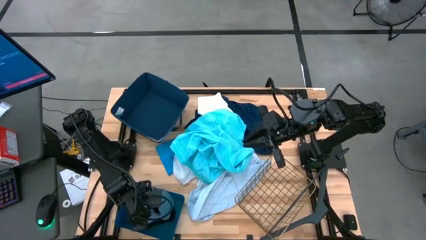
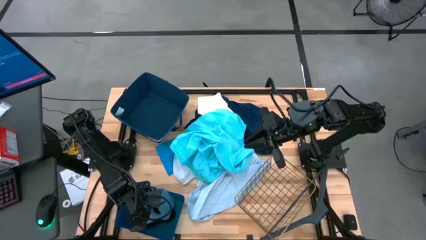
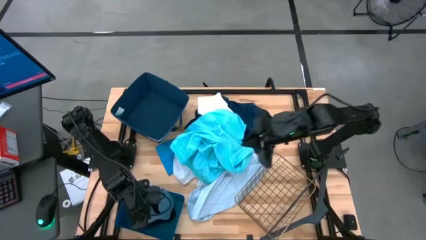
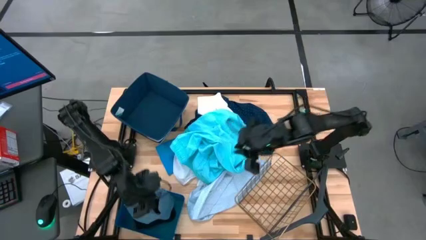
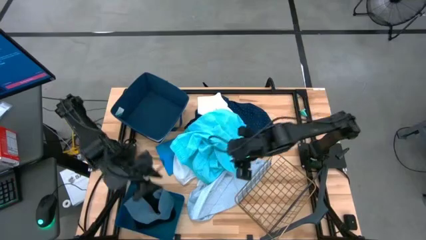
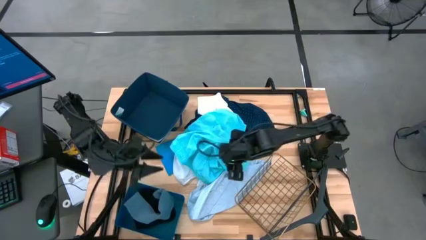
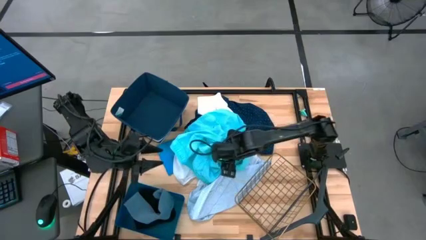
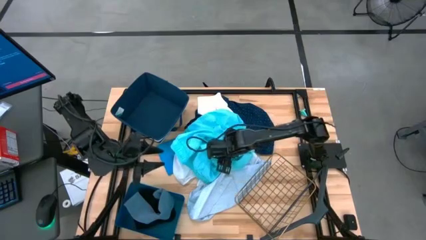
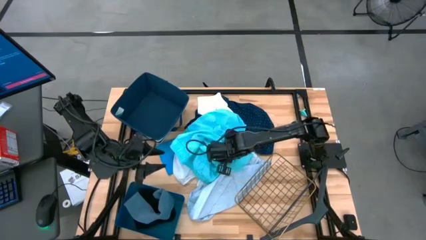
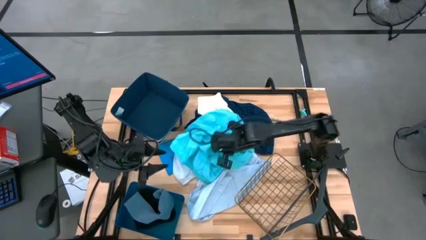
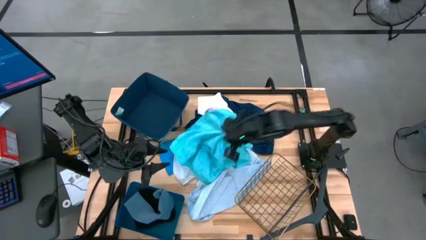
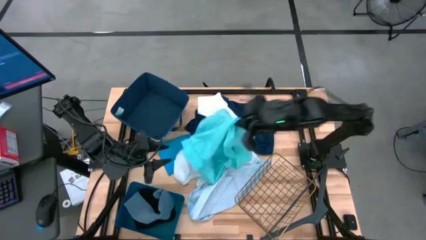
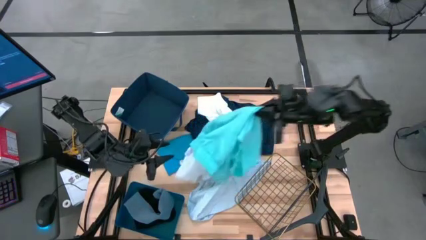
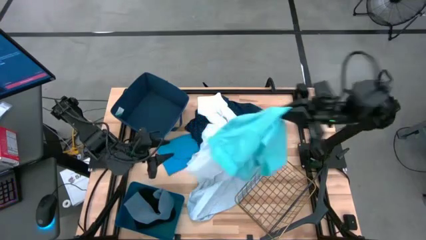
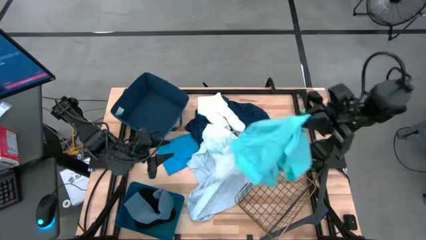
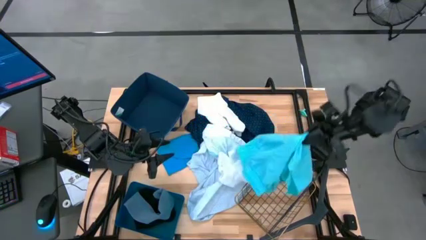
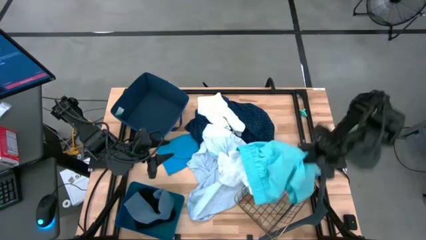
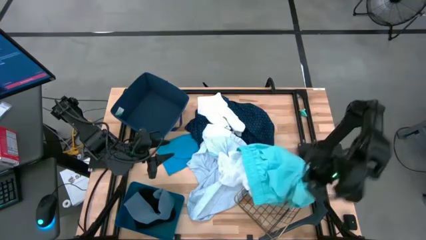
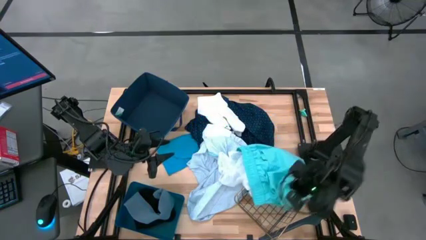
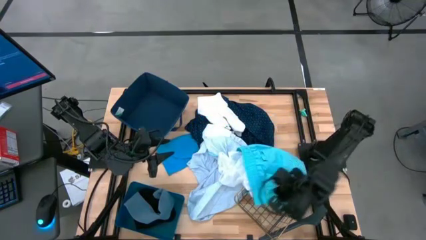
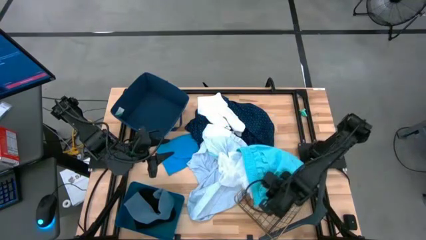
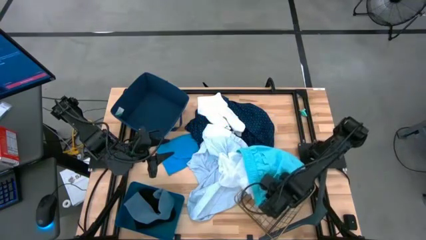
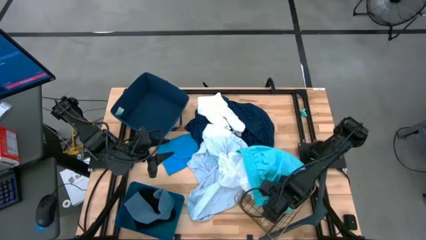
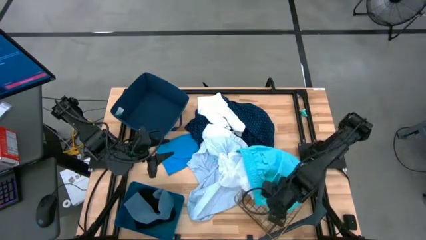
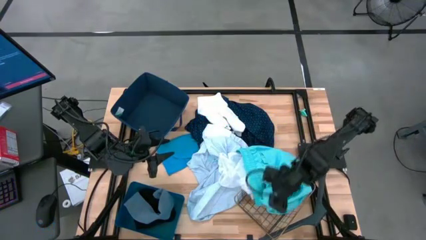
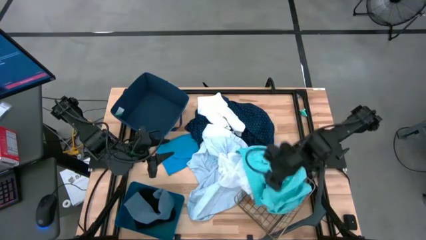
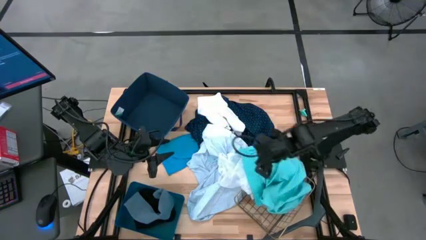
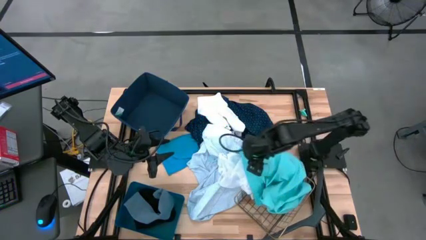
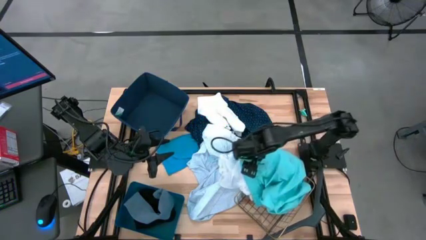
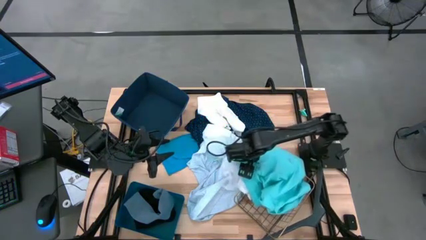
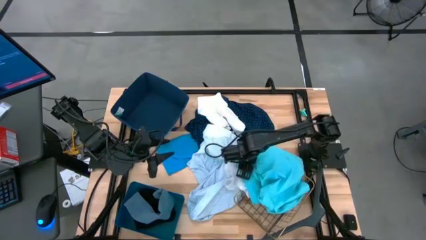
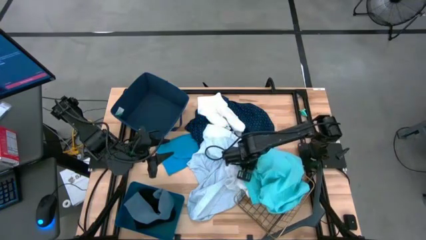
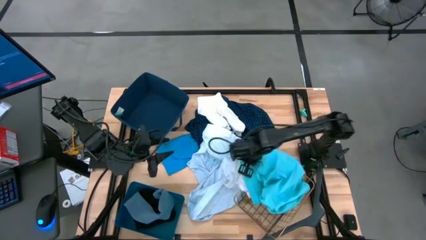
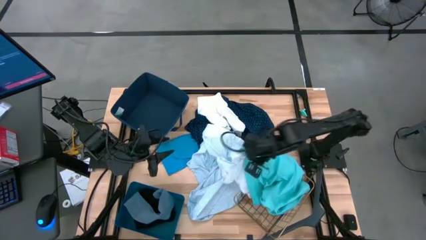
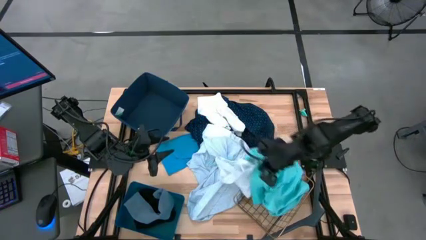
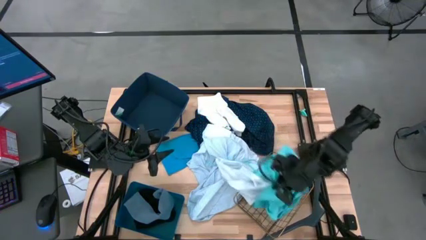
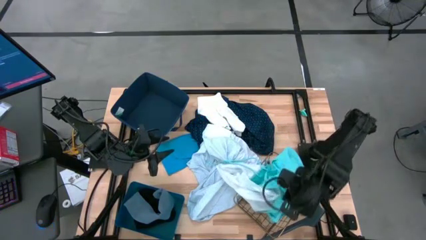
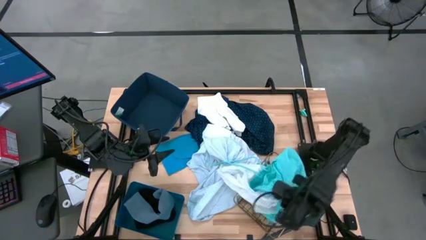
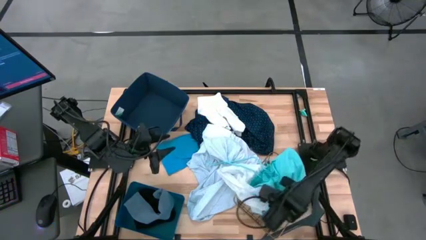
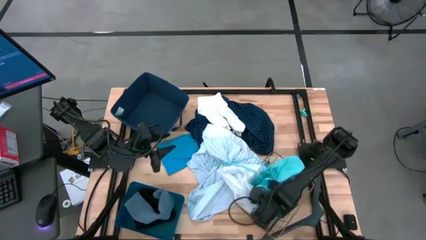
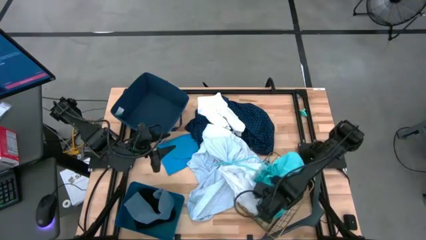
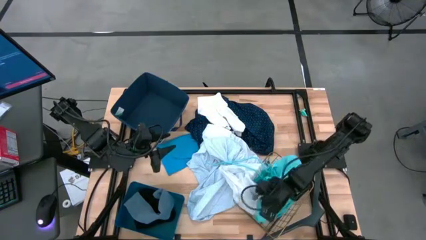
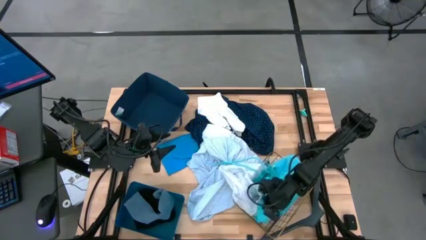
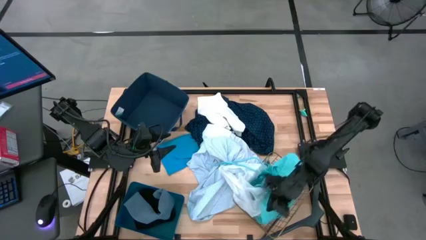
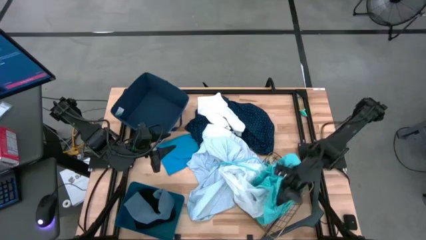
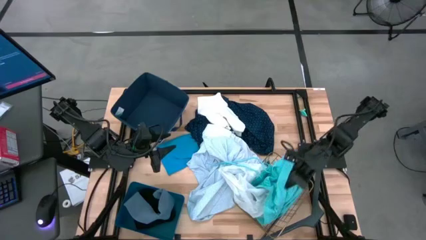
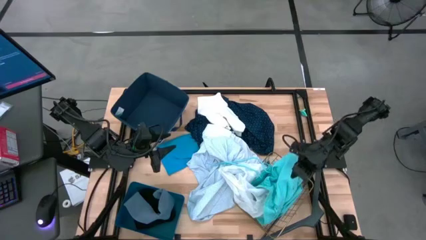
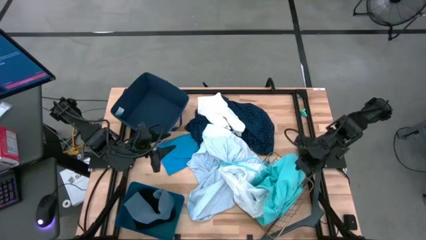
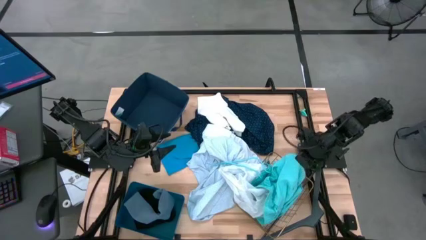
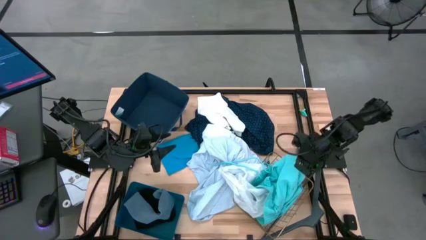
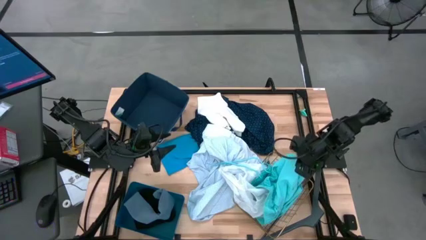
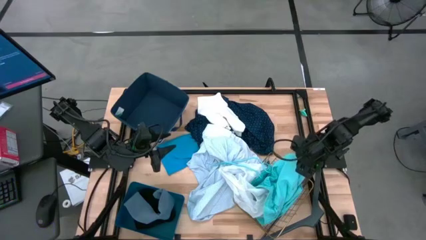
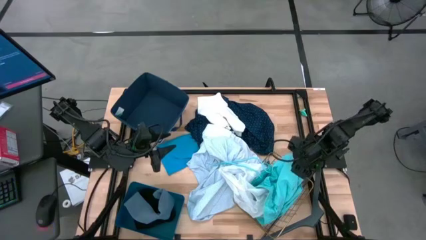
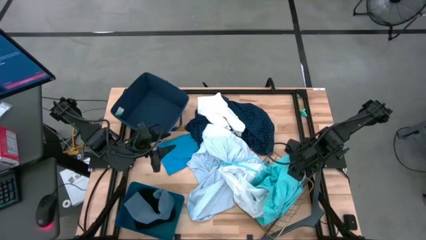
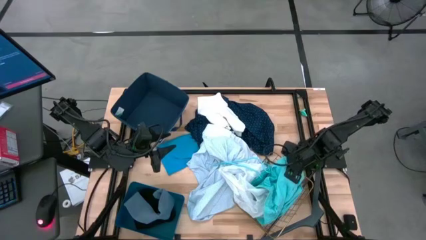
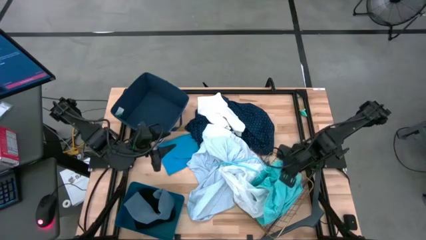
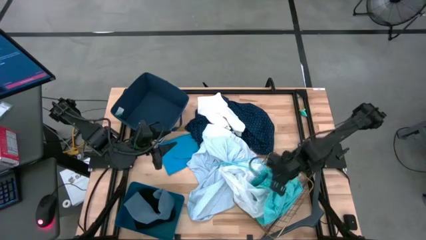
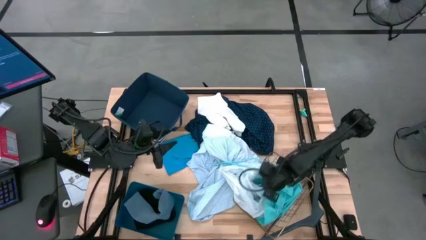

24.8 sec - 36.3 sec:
Task: Pick & Place Cloths
Put the light blue shorts into the gold basket
